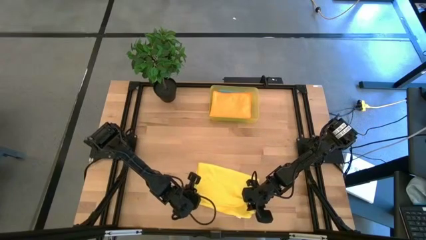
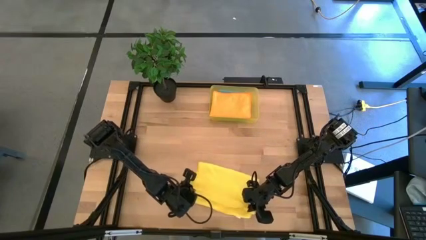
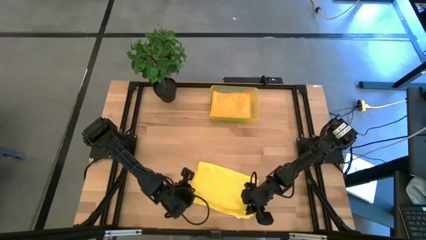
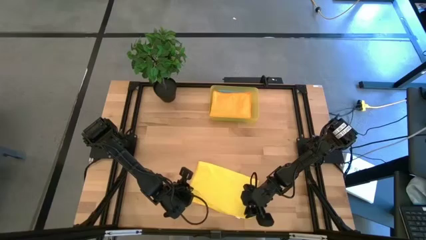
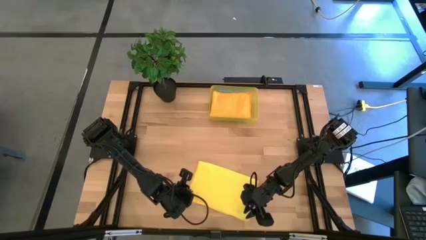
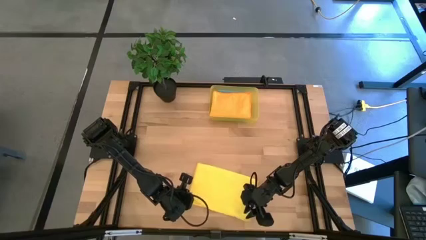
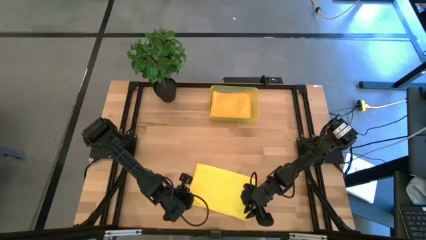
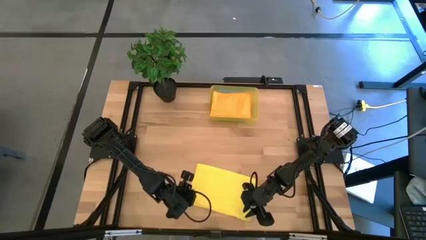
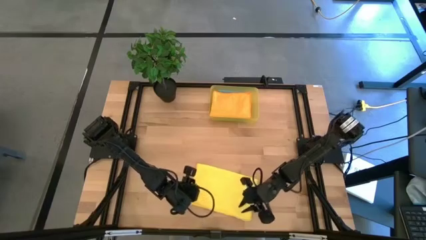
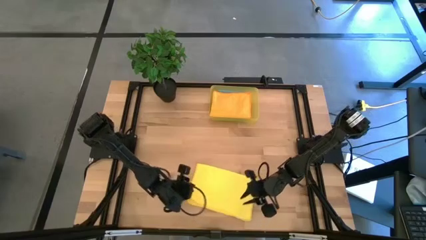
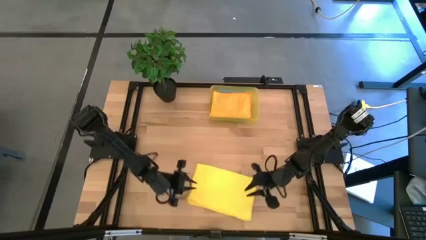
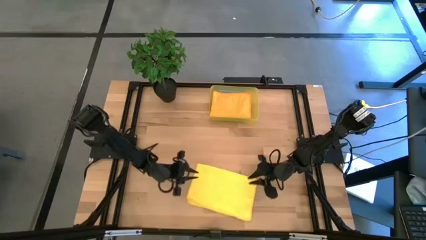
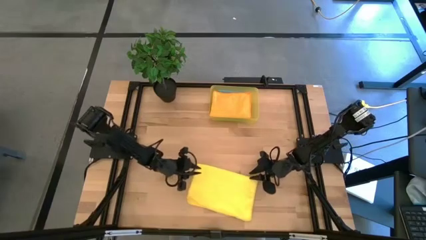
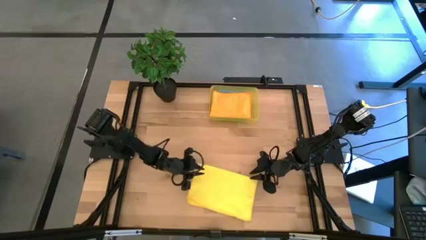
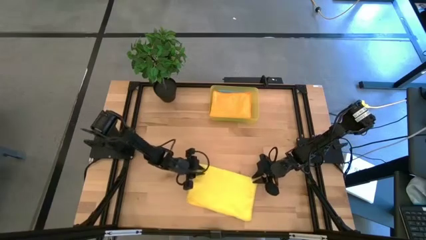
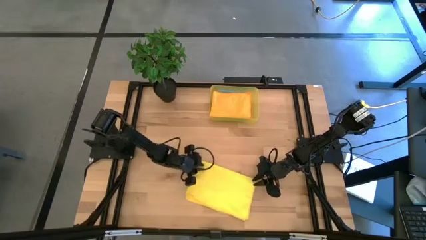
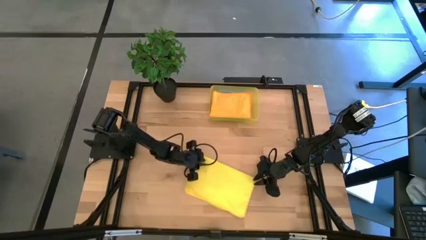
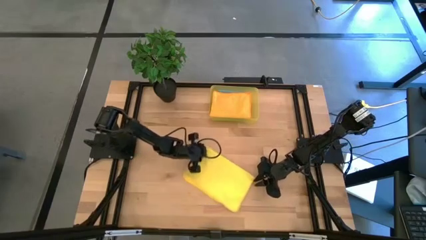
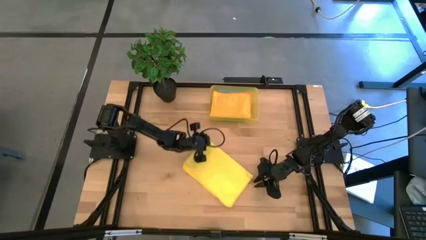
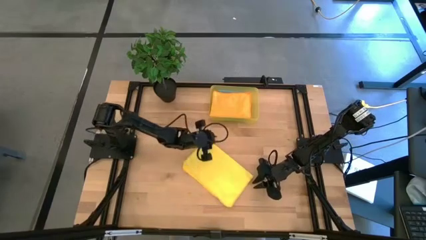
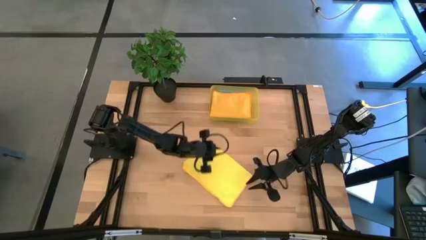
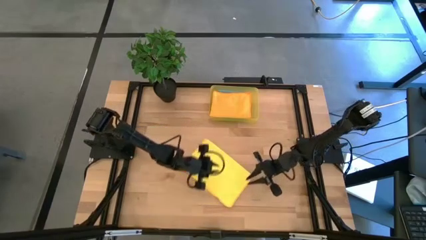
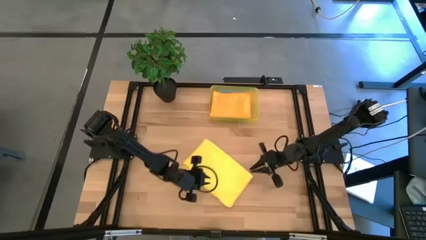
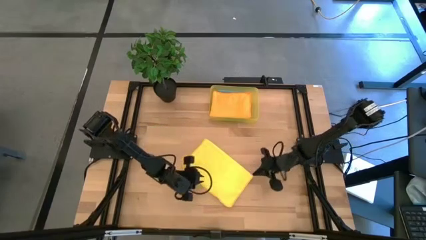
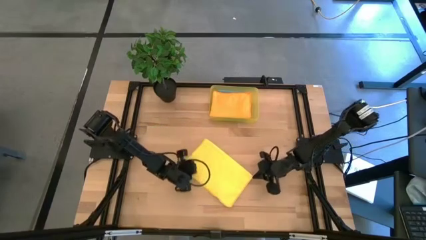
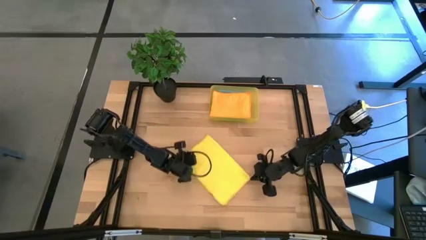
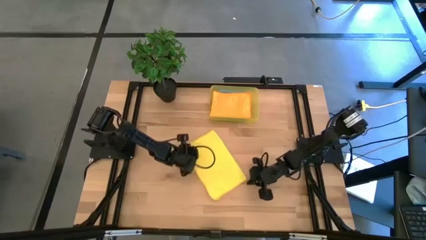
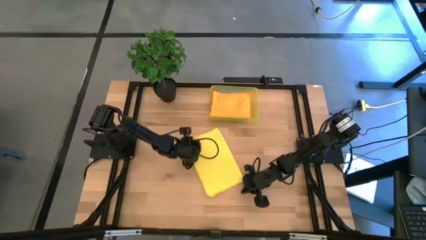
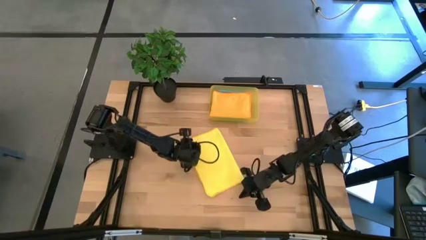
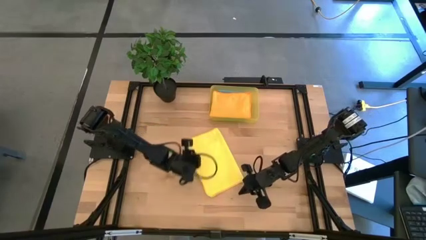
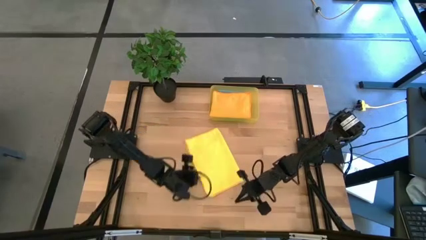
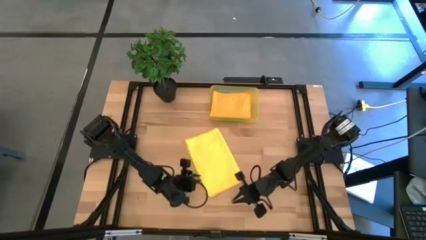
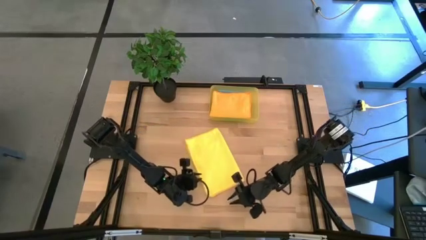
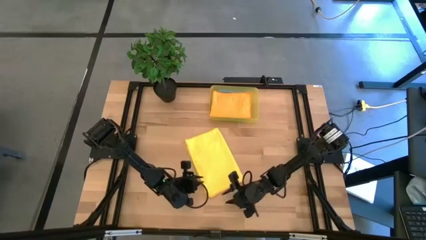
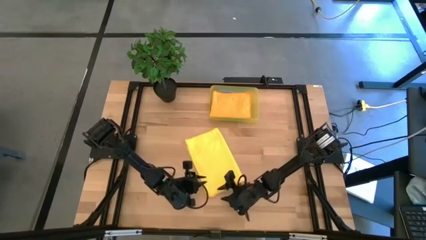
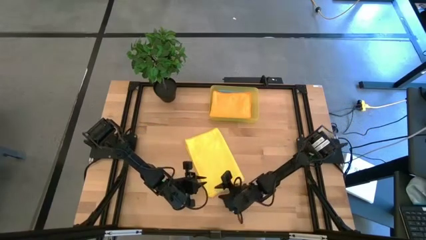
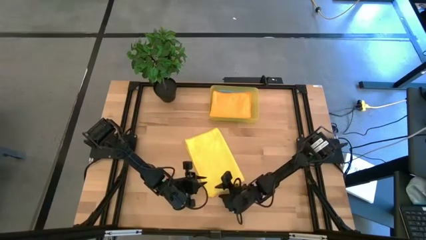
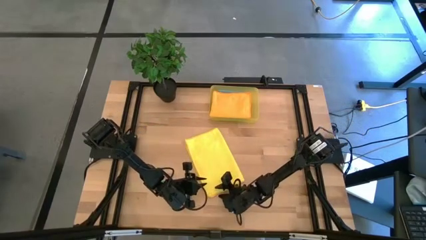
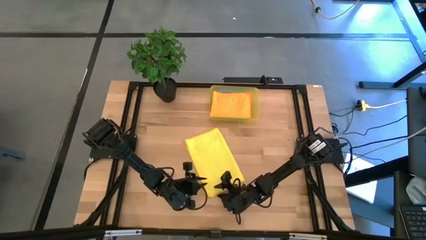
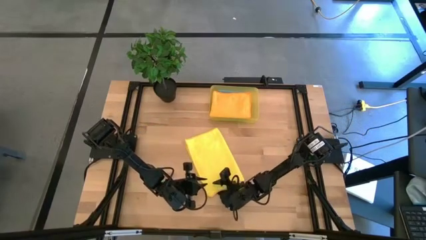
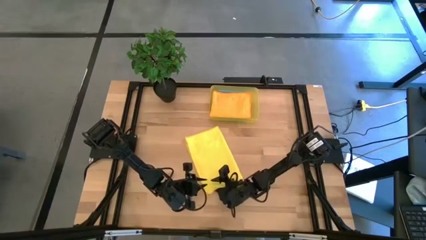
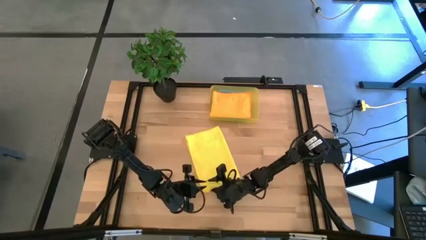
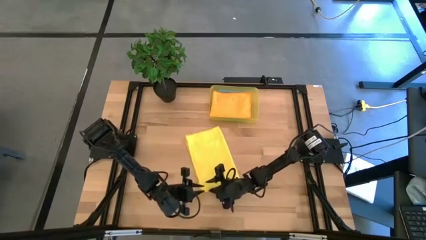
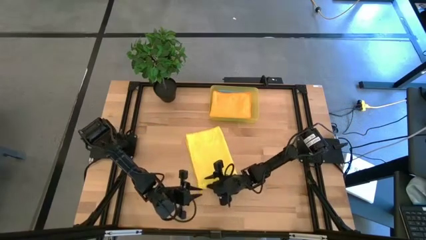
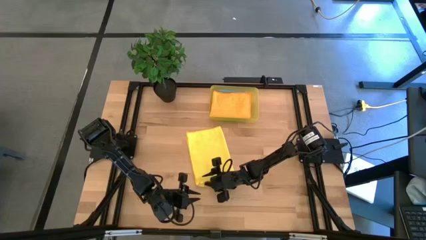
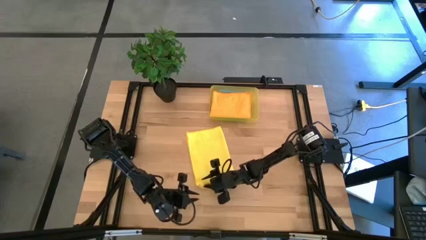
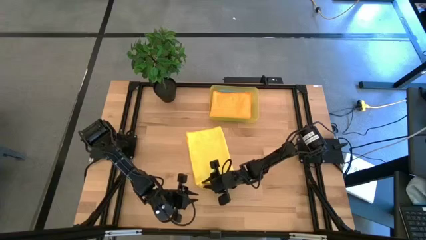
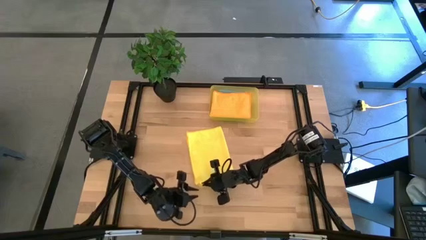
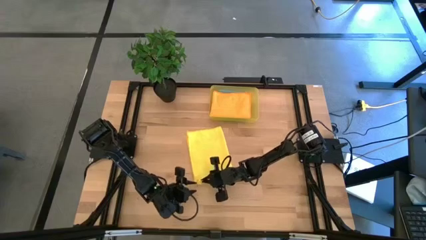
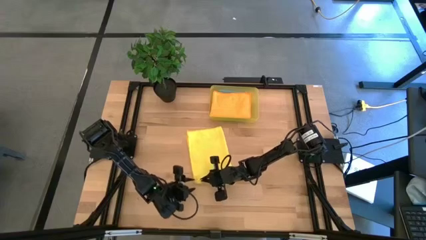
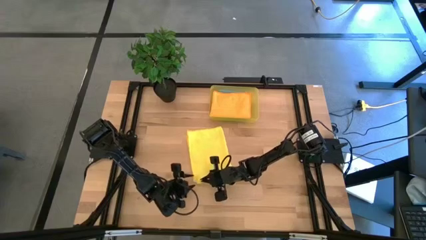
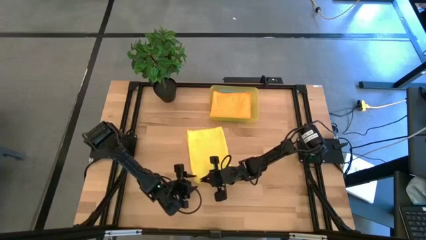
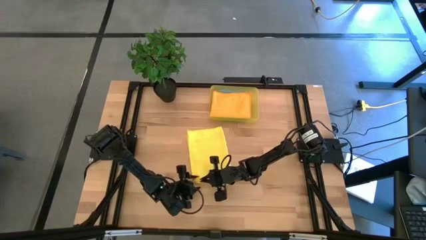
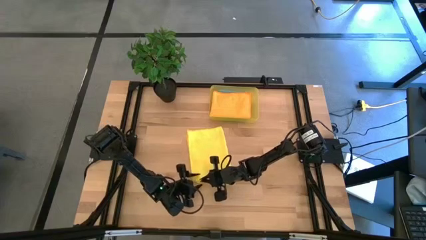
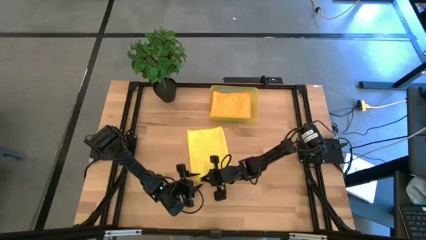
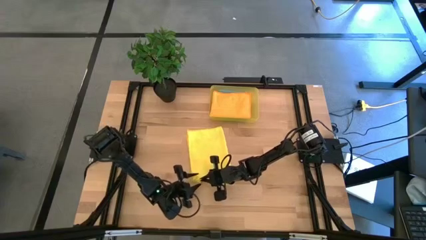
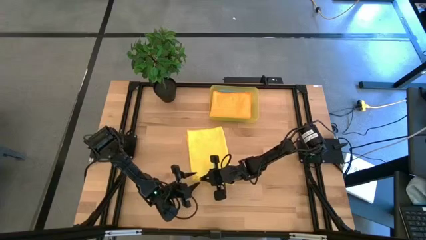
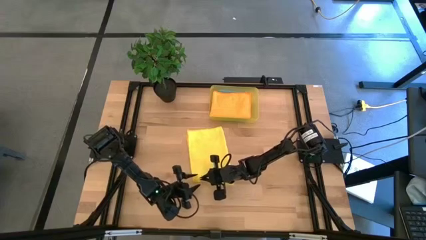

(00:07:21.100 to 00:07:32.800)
Task: Fold microfiber towels
Fold the yellow microfiber towel

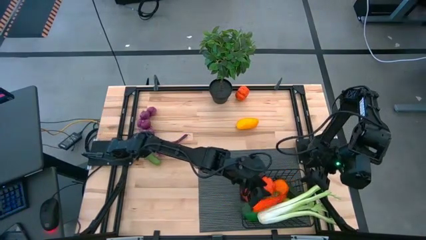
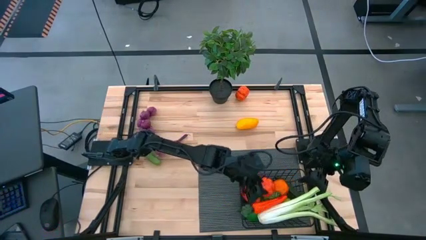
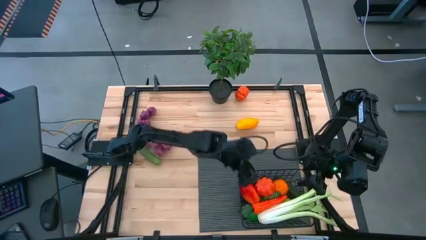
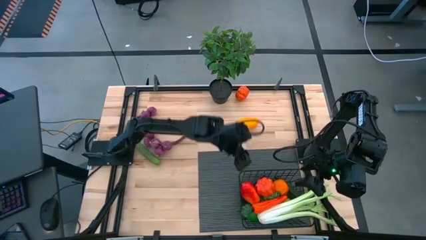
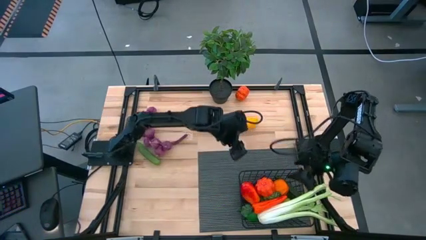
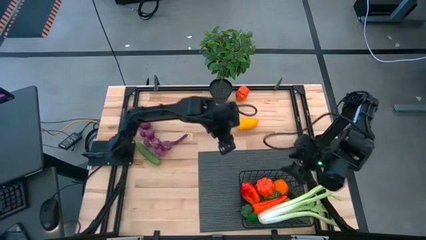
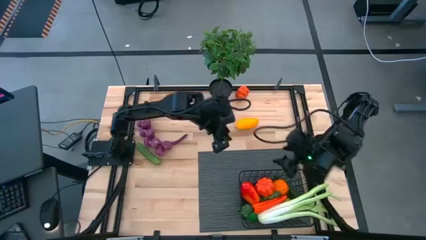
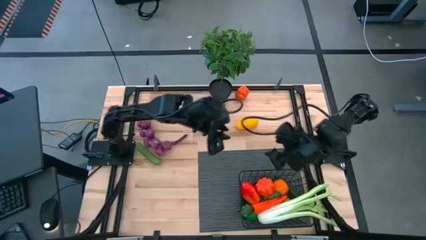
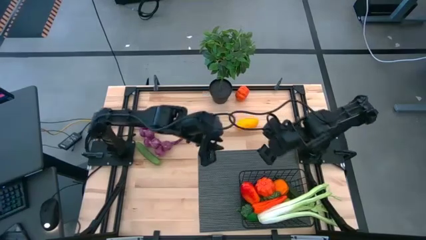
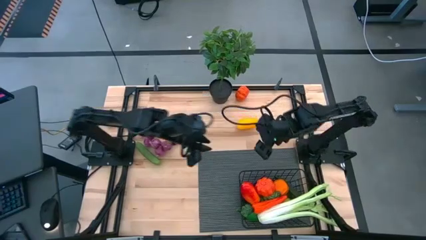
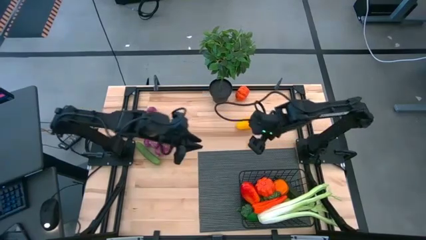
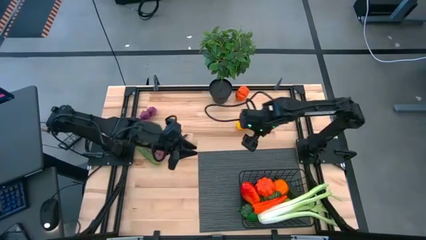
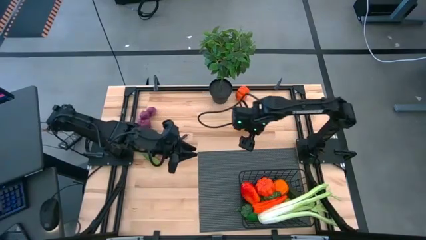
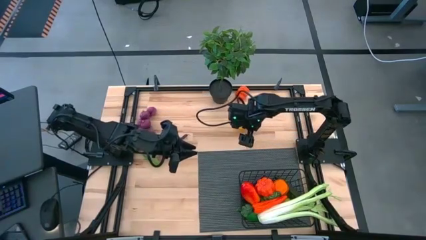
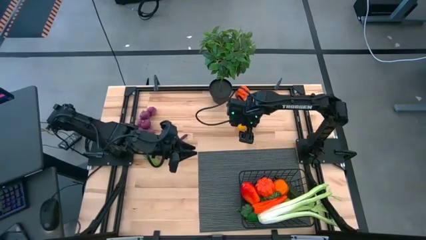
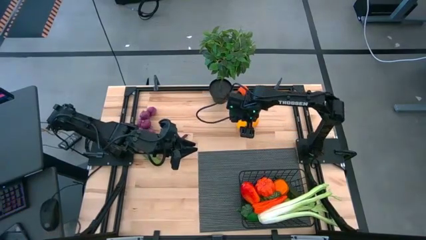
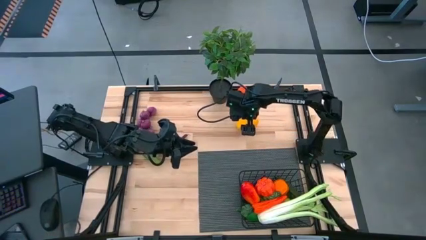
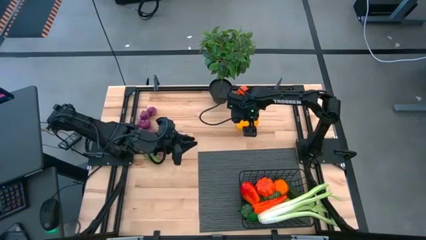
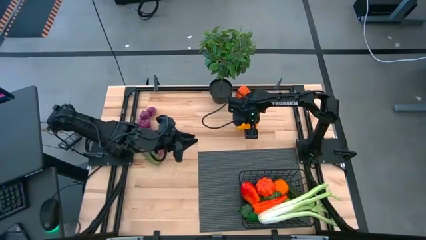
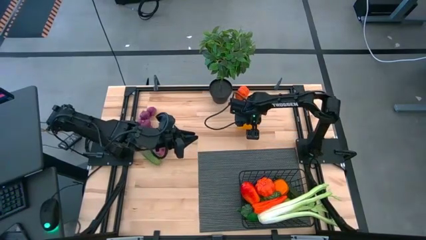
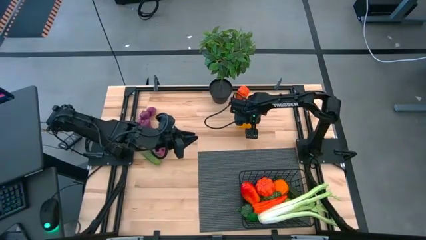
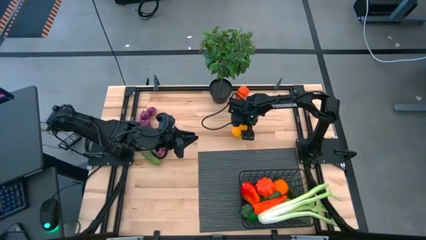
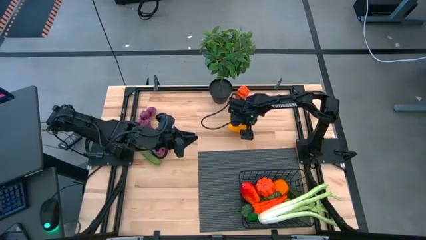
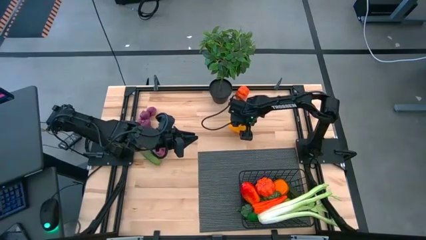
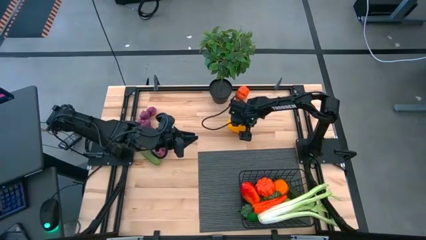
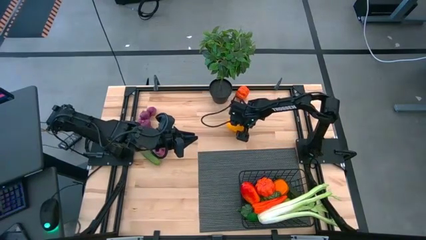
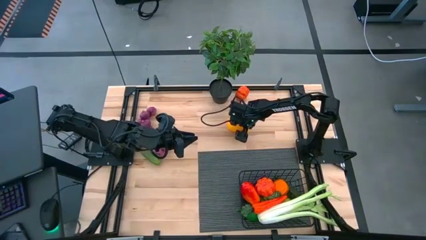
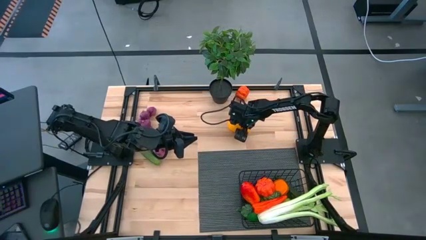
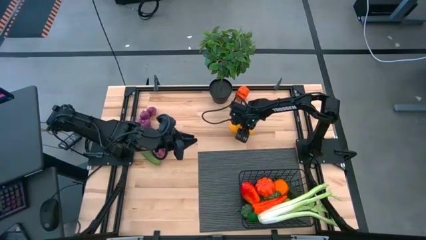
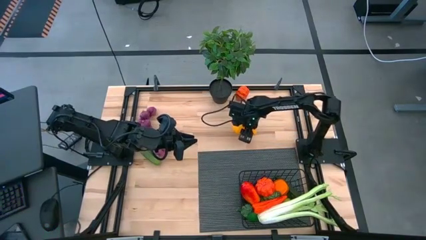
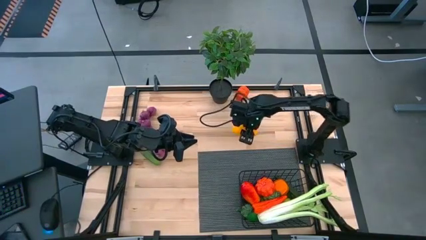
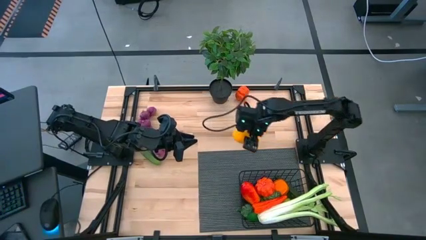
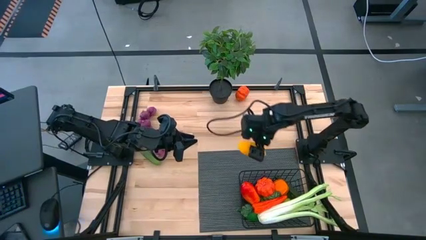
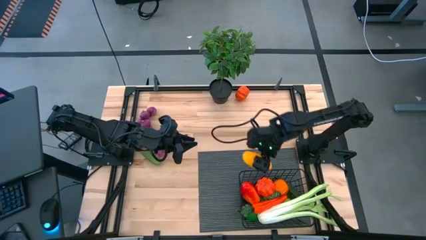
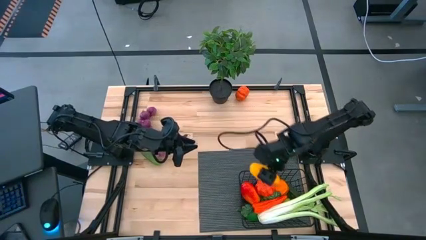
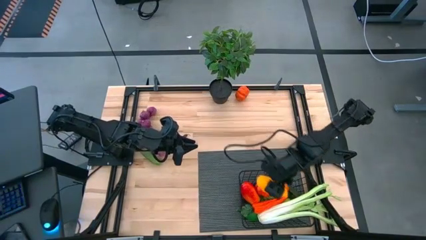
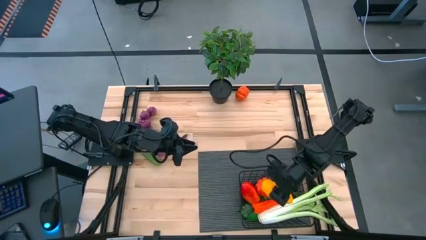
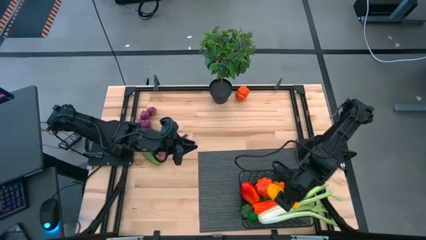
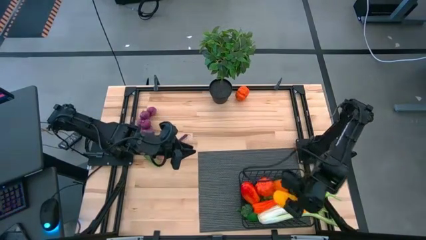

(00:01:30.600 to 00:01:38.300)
Task: Build produce basket
Put the yellow mango into the black wire basket
